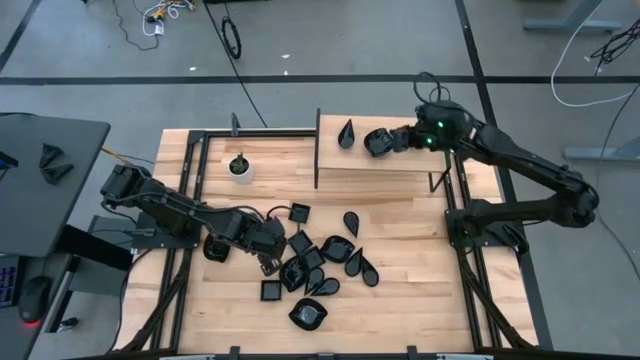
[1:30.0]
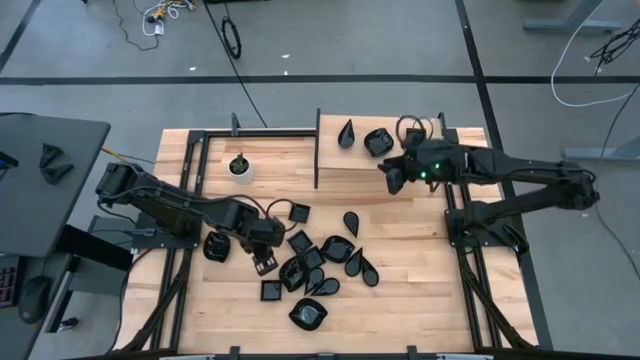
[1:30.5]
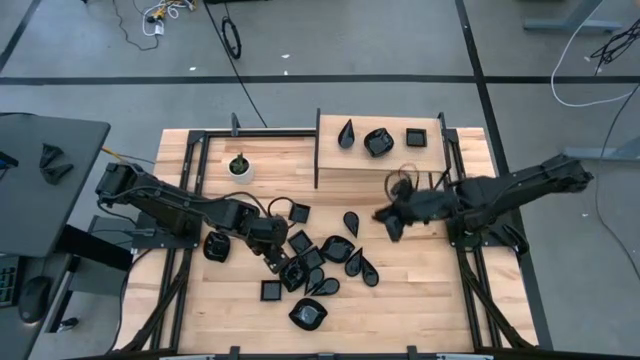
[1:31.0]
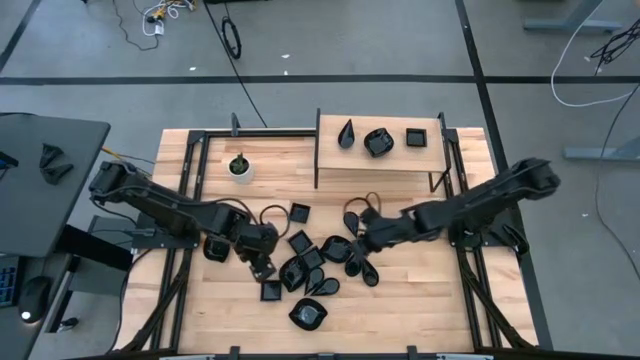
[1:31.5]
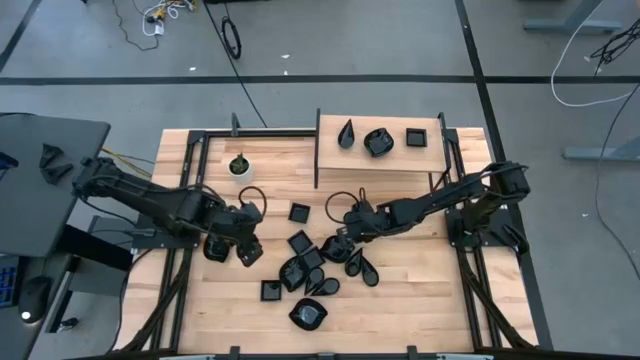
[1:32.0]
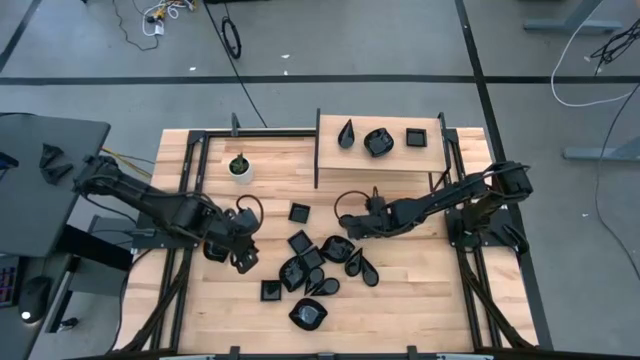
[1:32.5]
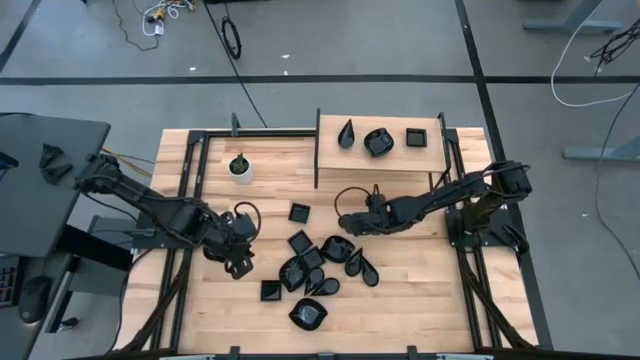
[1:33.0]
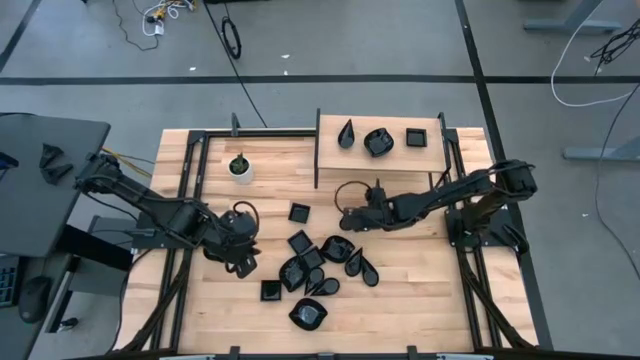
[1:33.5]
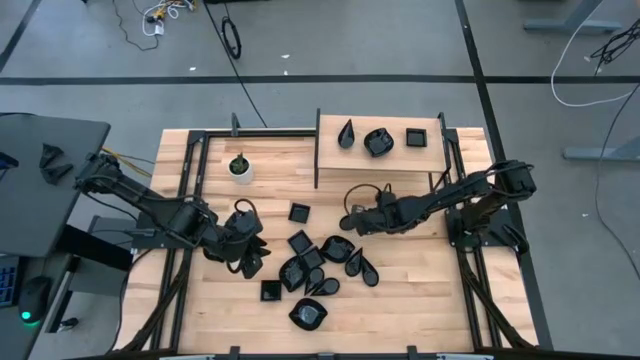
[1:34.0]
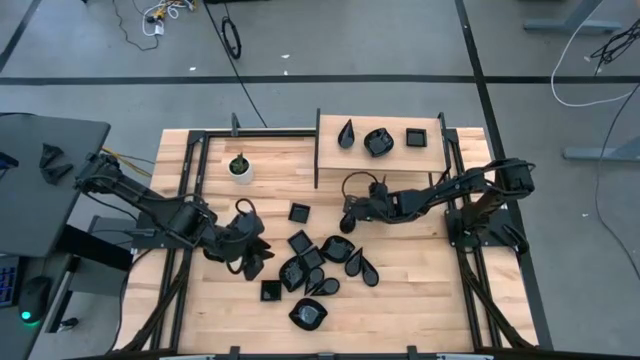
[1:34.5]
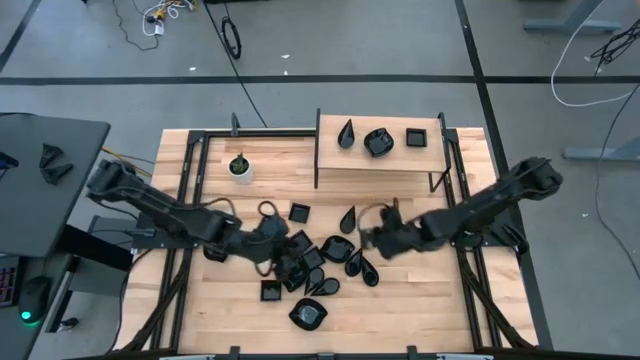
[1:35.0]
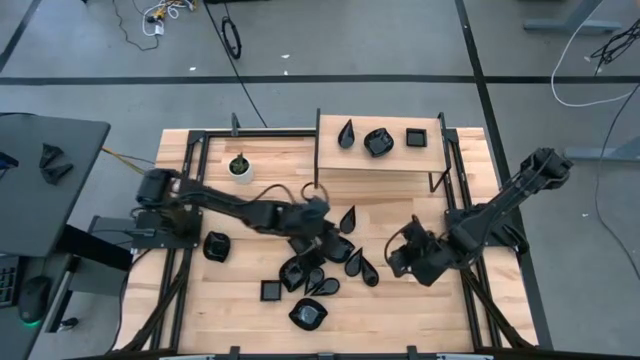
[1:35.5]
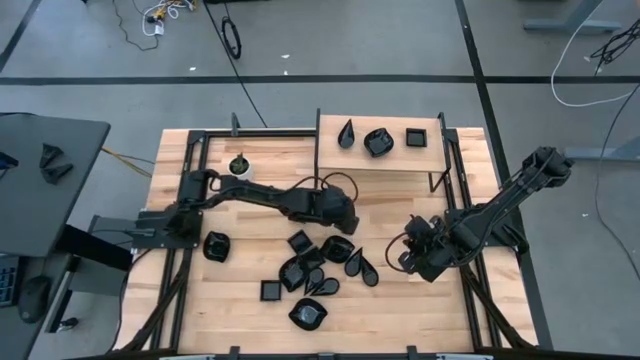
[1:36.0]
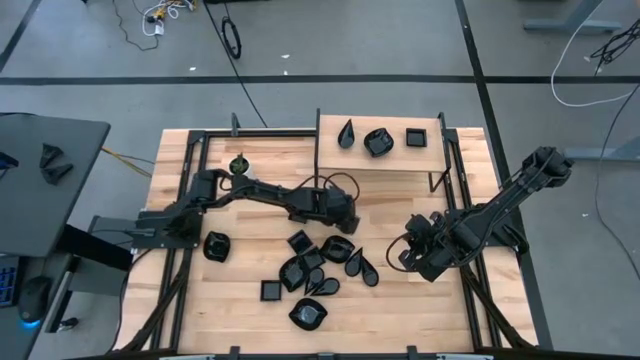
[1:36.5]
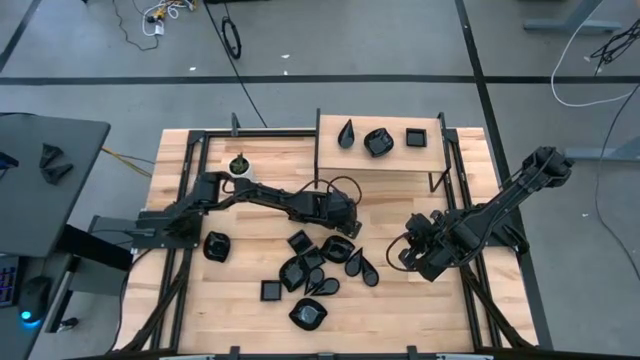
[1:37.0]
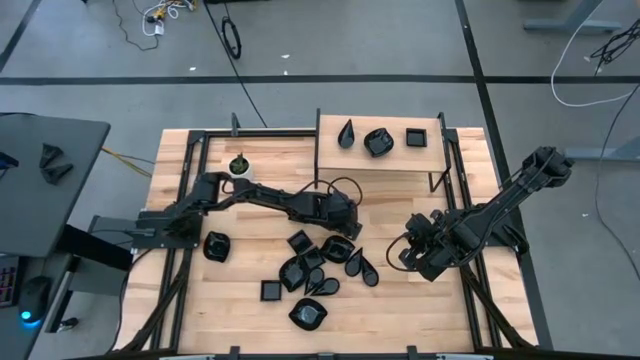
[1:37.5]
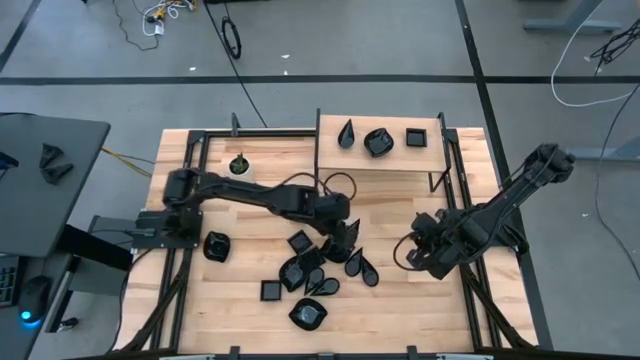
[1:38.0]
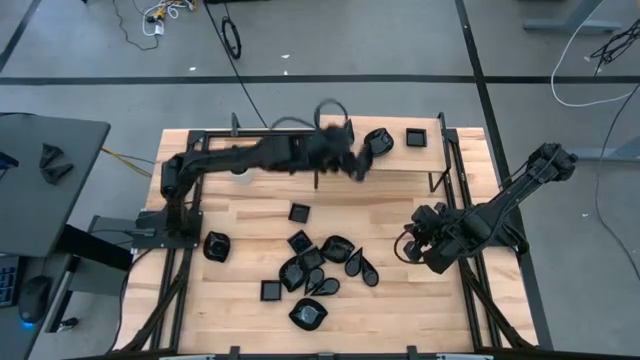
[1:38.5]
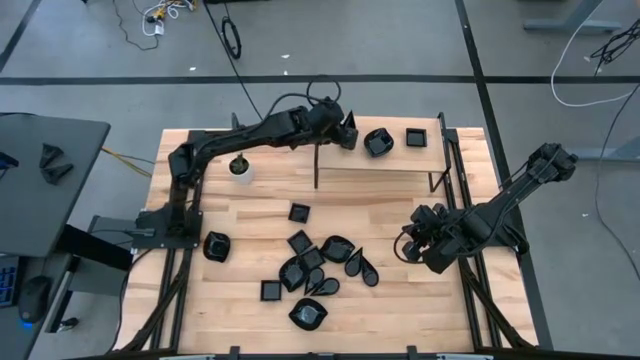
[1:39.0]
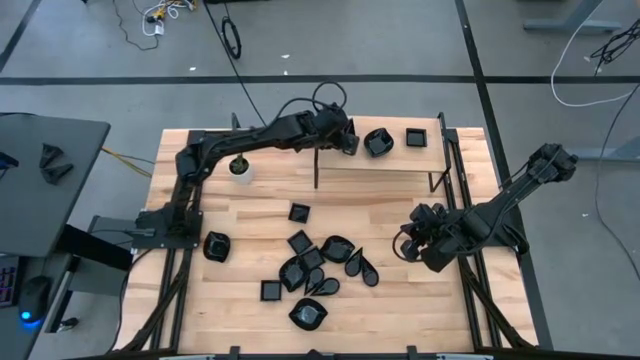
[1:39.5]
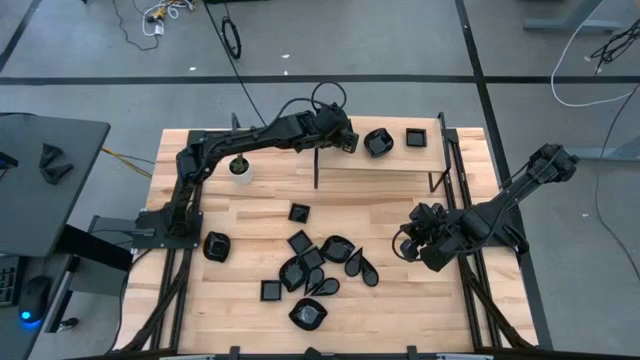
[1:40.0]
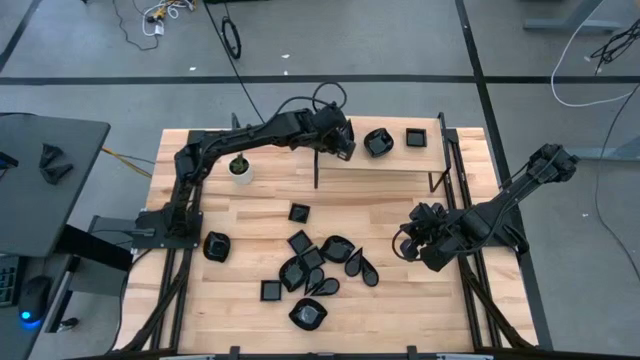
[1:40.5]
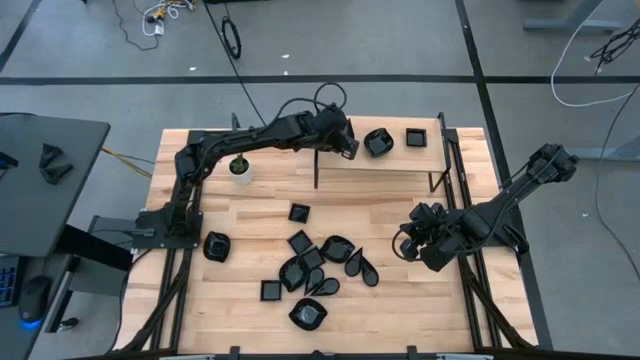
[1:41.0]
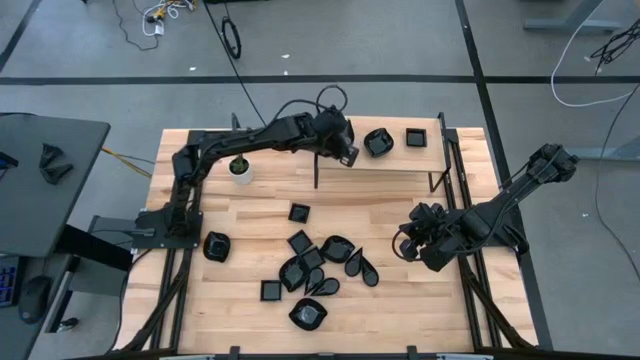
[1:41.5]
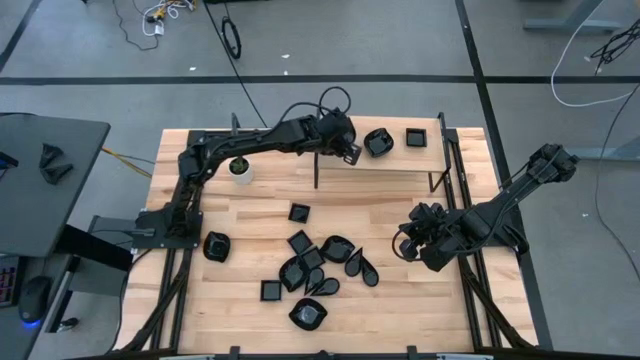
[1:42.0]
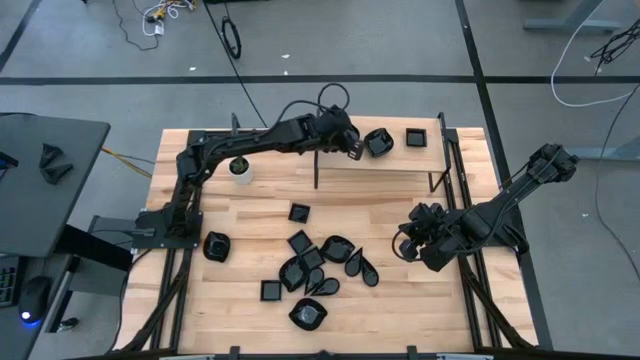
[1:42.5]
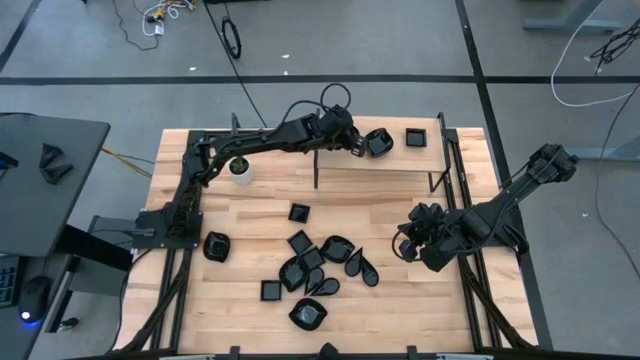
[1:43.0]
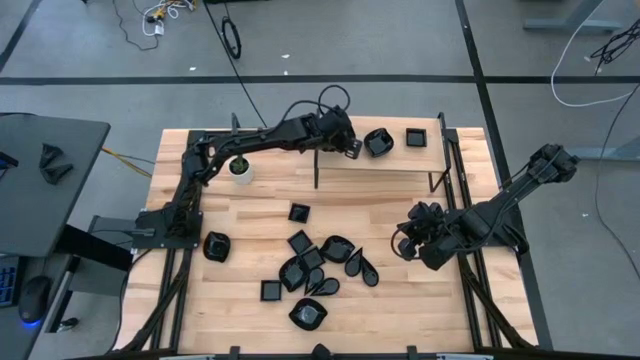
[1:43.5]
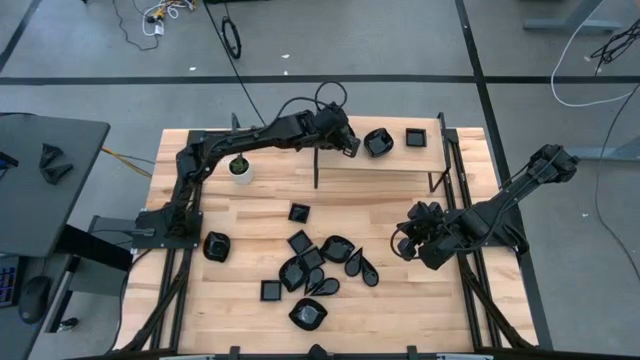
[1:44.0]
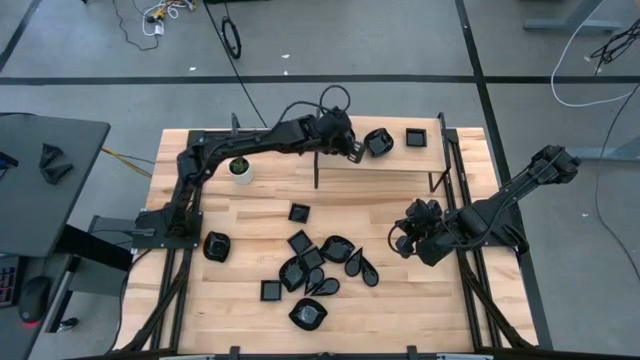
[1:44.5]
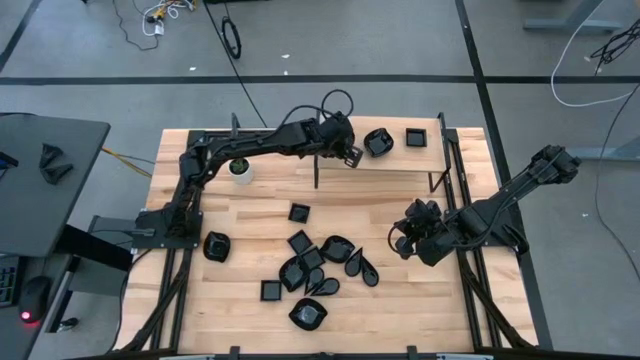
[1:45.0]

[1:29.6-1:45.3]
Task: Pick & Place Mini shaped plates
Stack the drop-shaped plate on top of the drop-shaped plate on the shelf

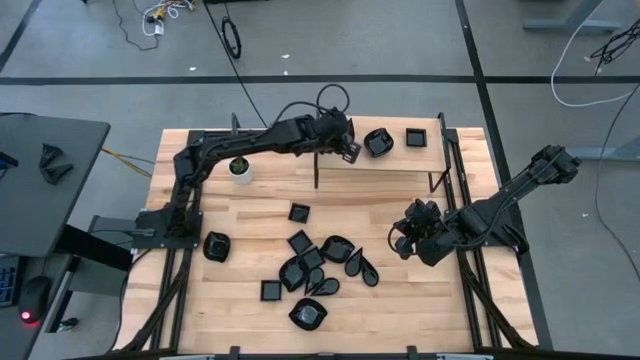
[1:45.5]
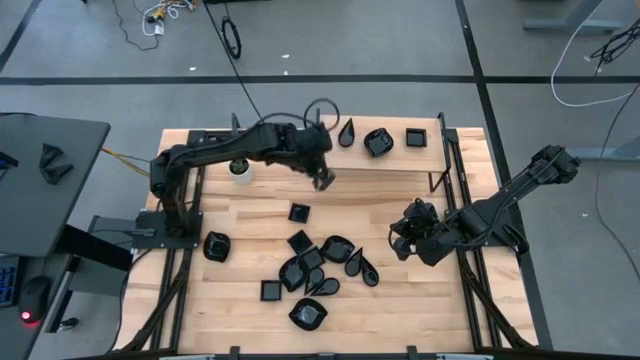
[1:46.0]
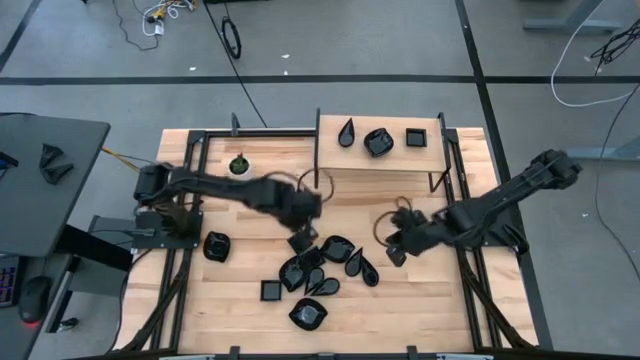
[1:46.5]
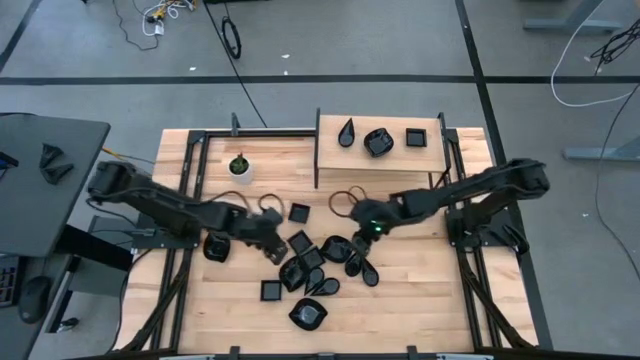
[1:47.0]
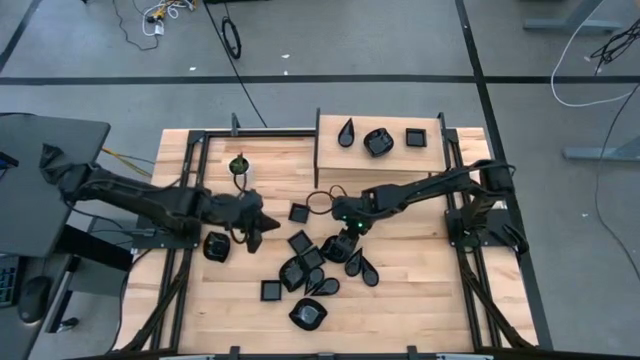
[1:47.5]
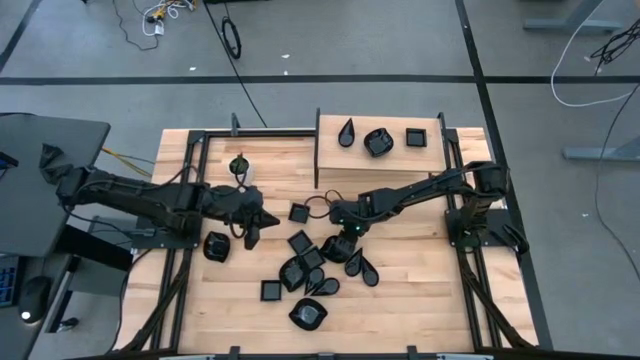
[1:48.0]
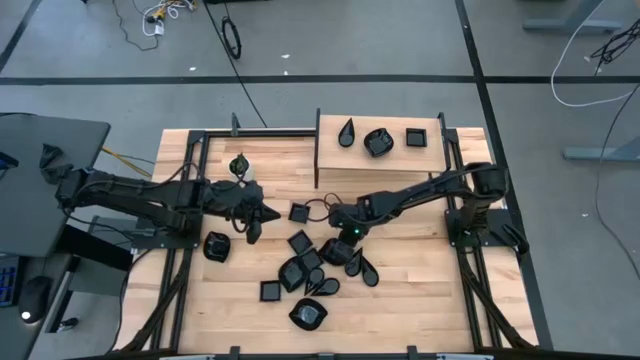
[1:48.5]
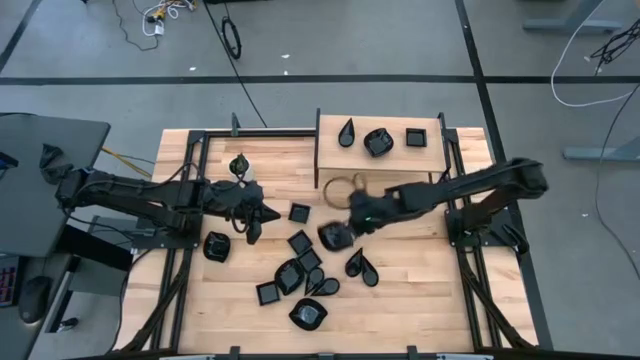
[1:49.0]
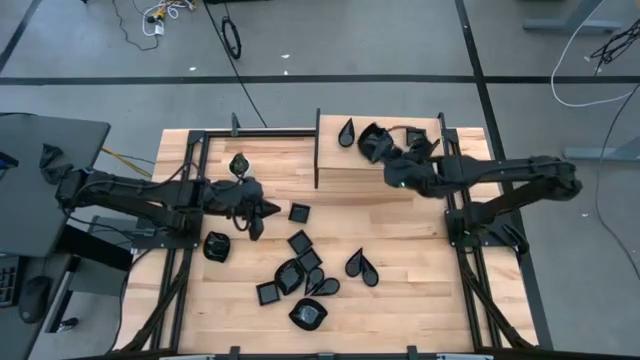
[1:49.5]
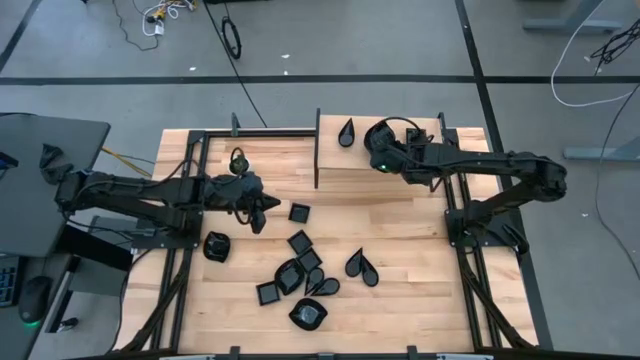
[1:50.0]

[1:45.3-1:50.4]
Stack the leaf-shaped plate on top of the leaf-shaped plate on the shelf

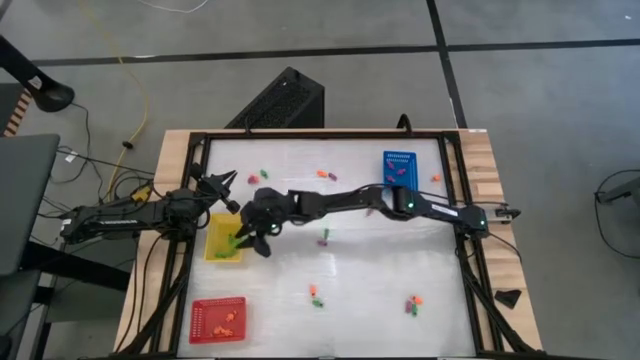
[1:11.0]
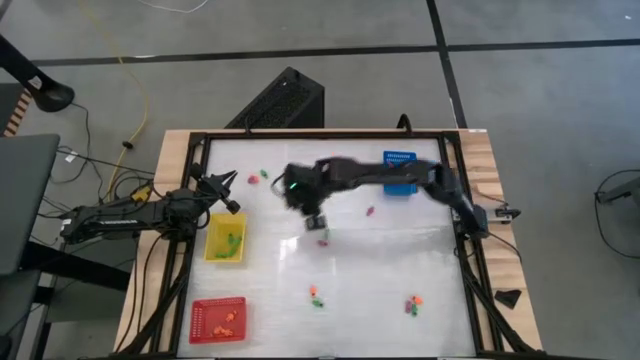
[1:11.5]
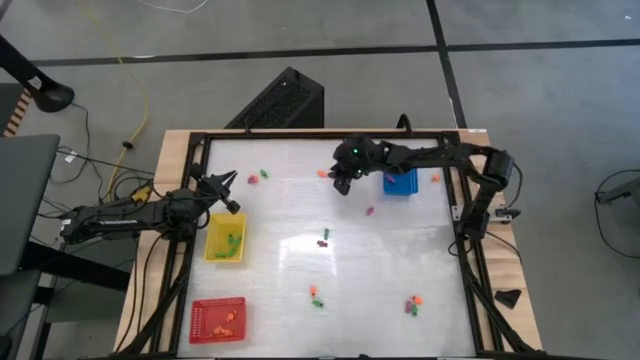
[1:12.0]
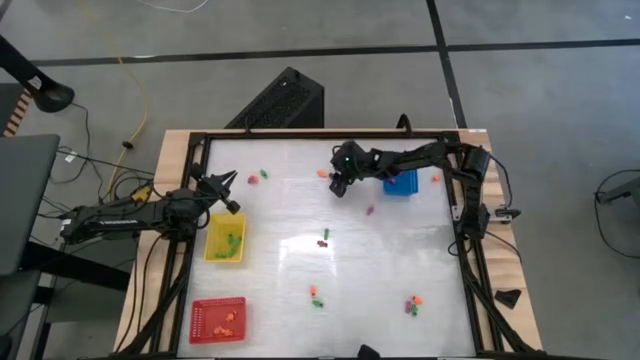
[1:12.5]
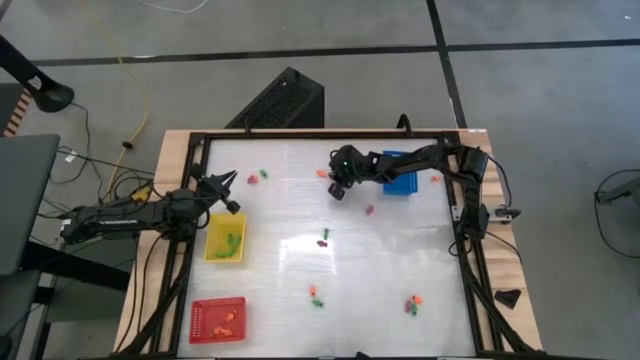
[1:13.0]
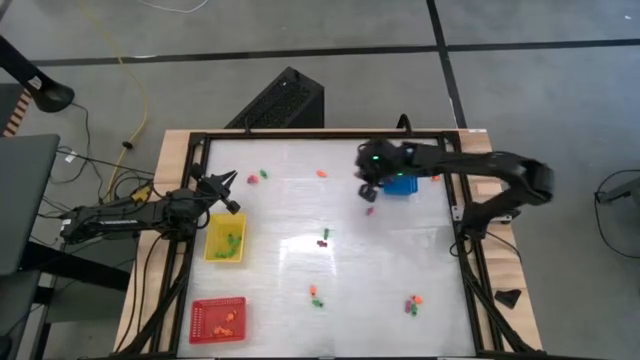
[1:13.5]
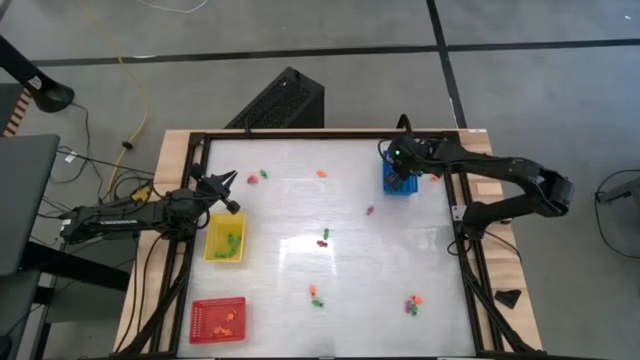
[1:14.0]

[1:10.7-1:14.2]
Task: Sort Halloween decoration
Put the purple skeleton toy into the blue bin
